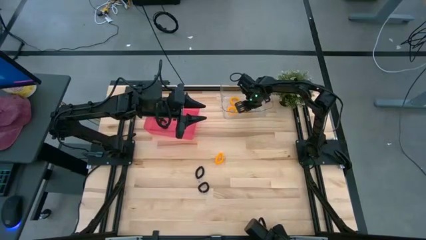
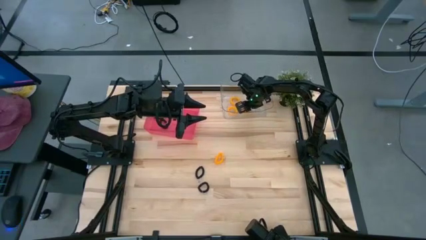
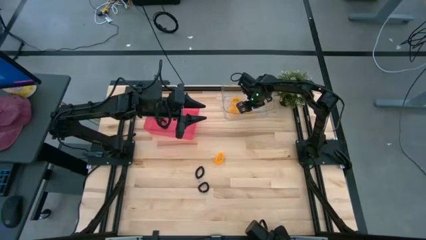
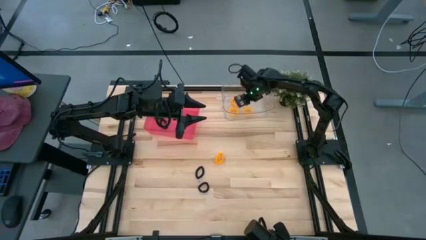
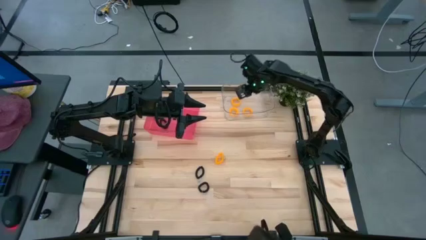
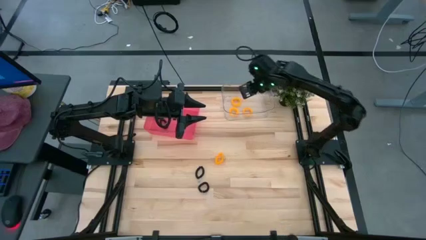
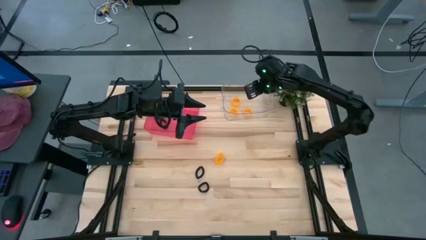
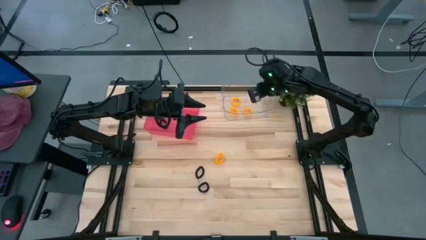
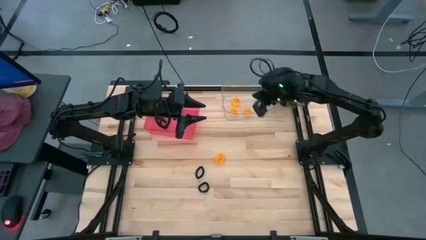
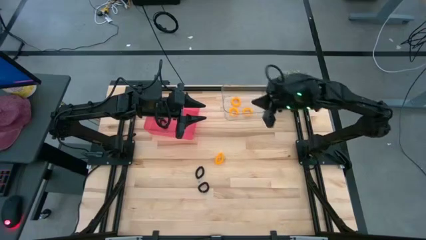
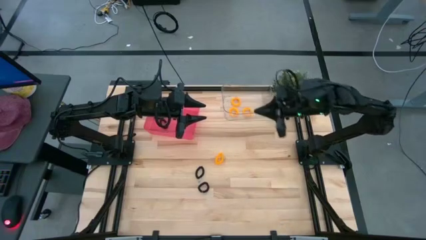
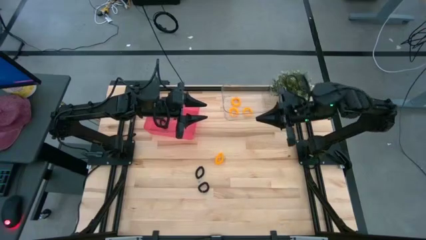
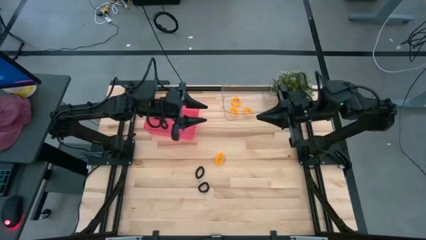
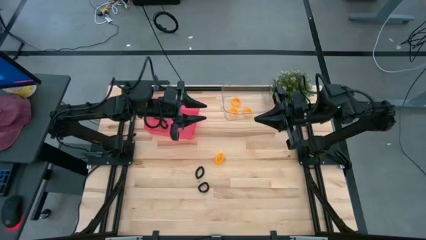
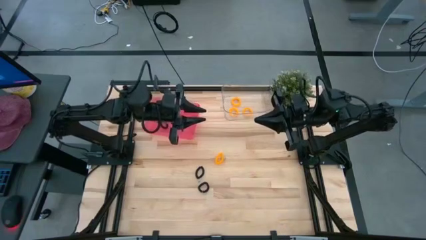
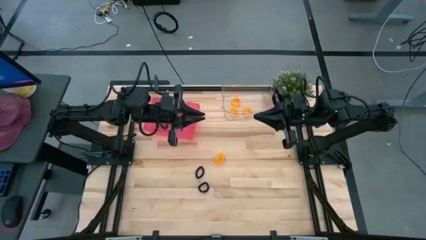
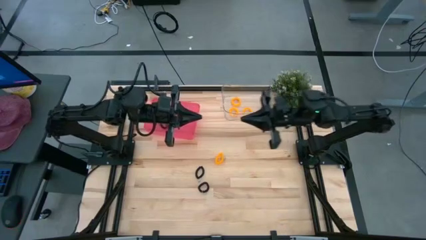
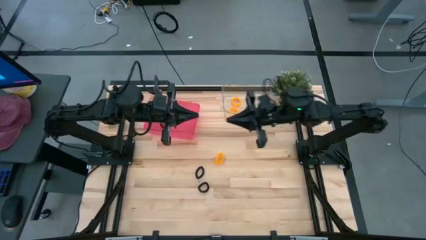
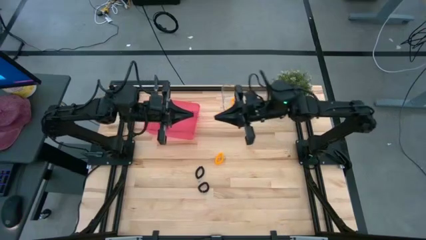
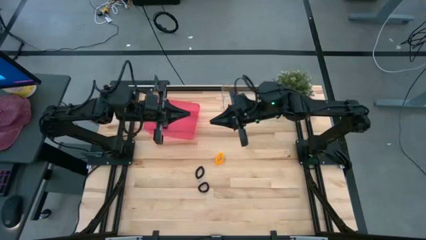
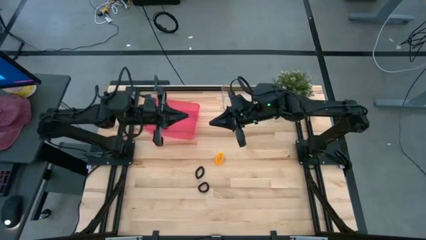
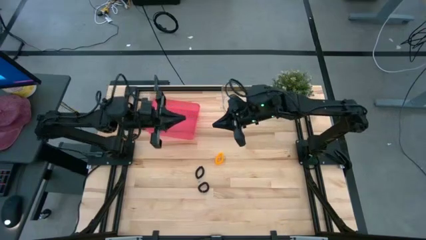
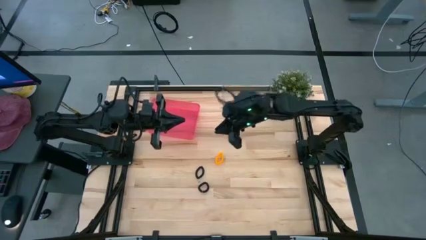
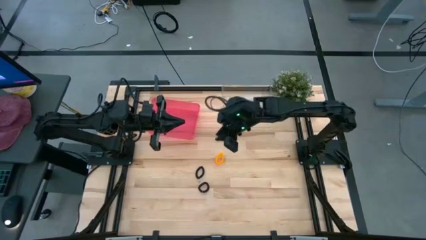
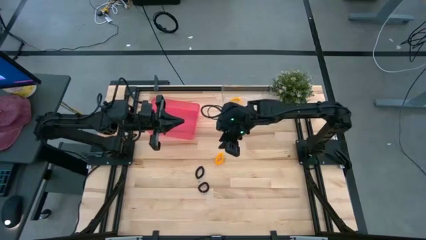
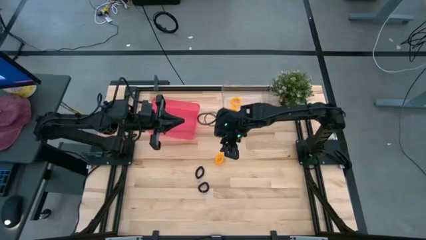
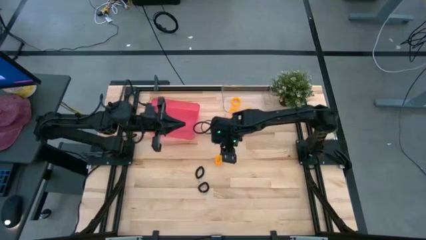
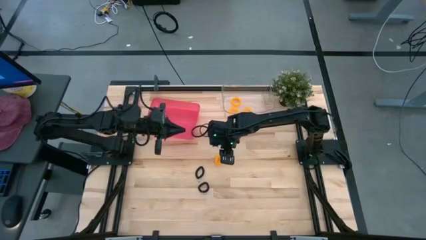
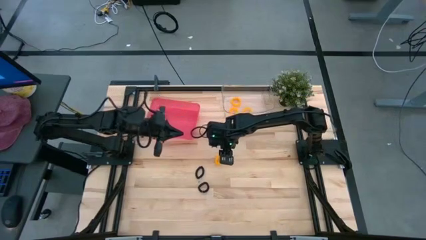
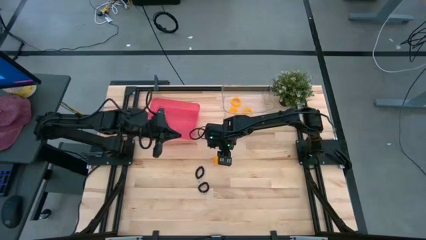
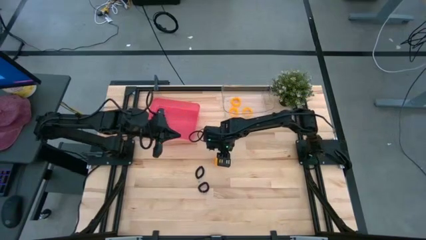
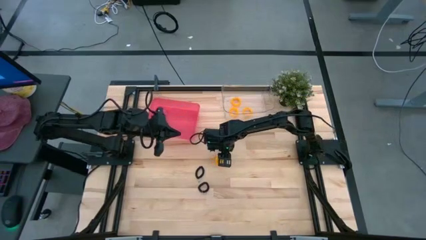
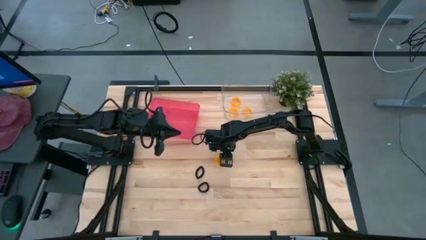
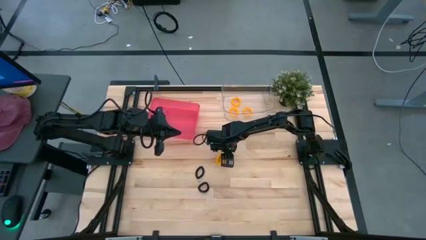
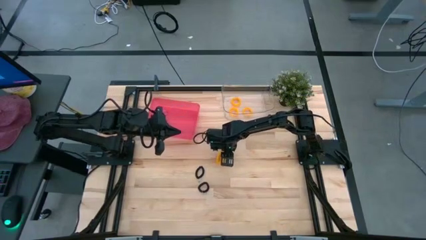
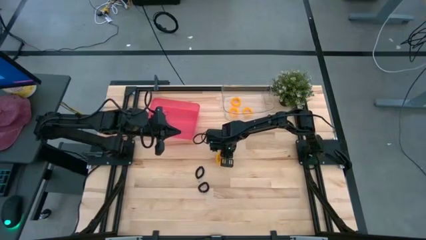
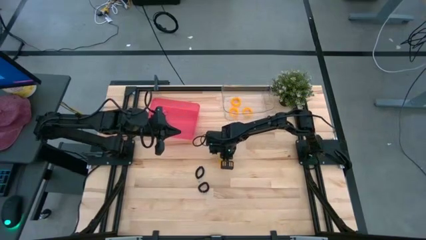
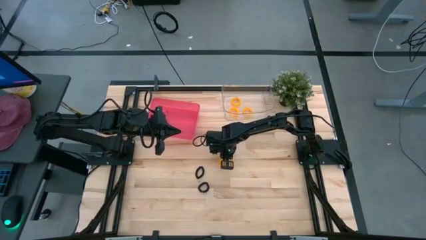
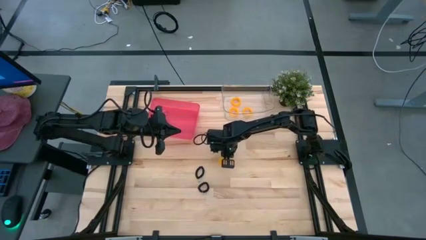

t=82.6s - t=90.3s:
Task: Sort spring keychains
Put the yellow spring keychain into the transparent bin

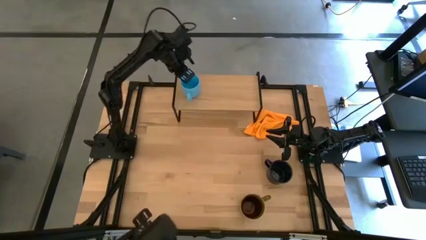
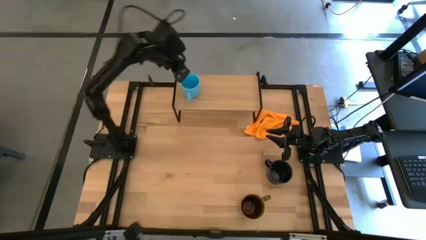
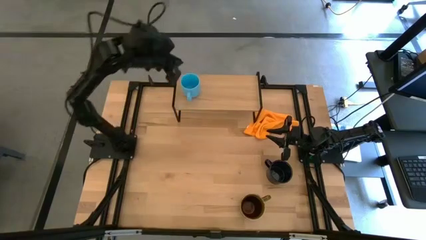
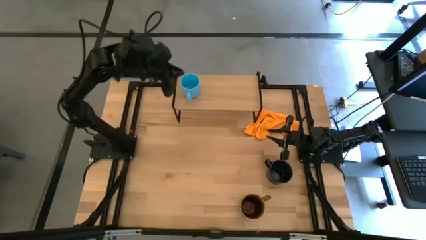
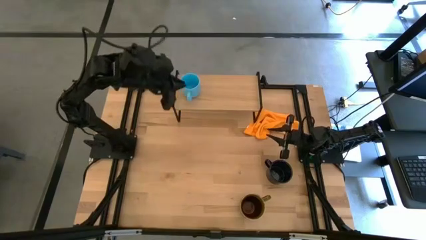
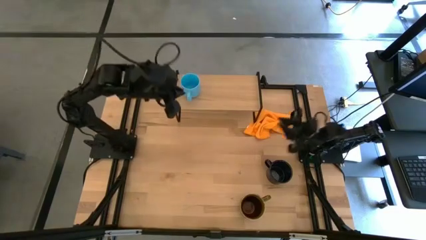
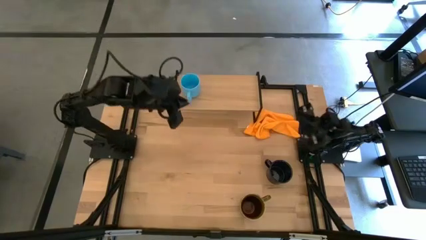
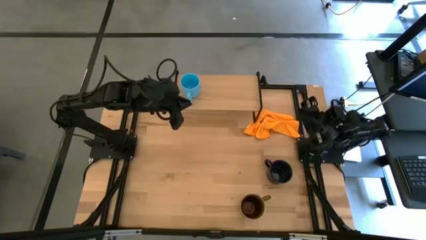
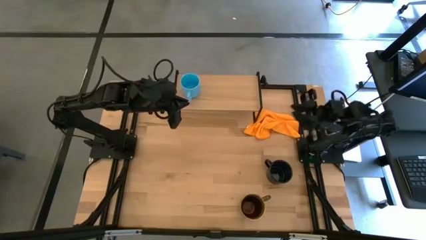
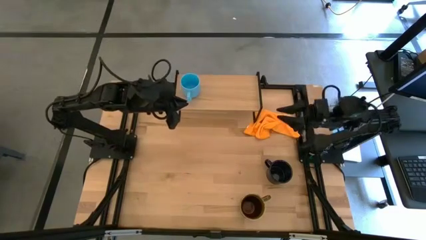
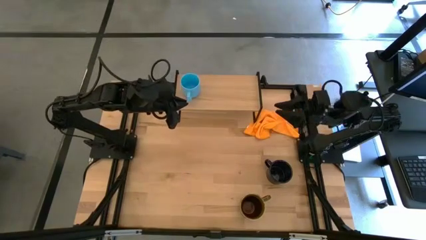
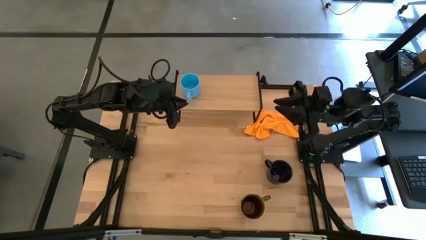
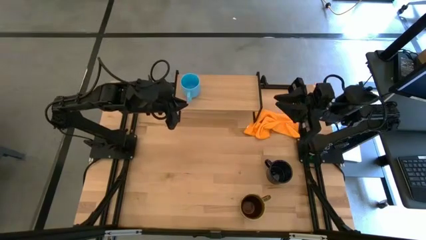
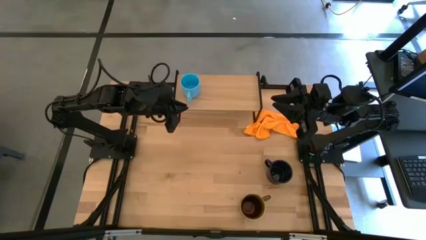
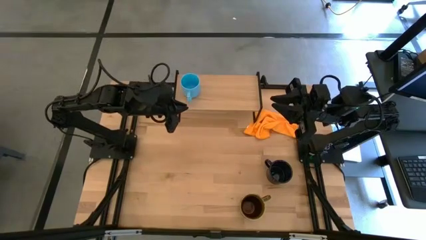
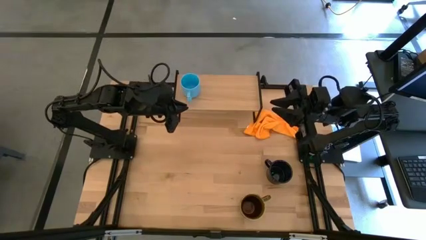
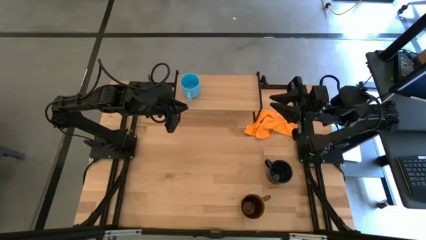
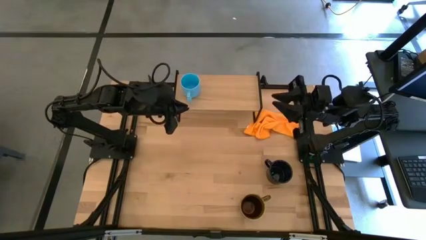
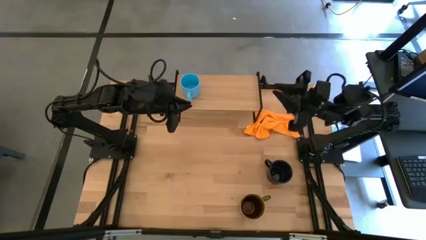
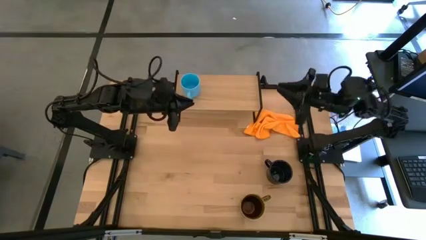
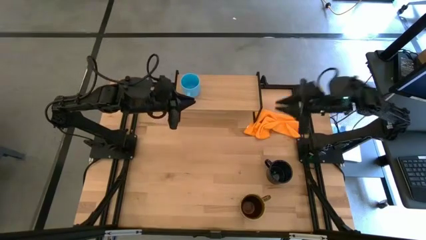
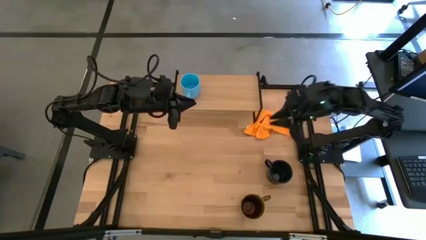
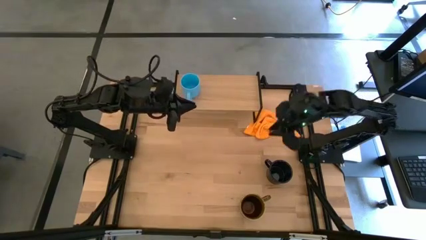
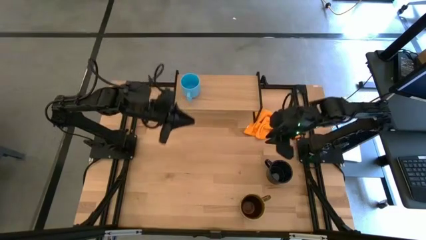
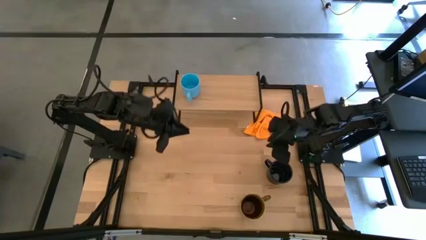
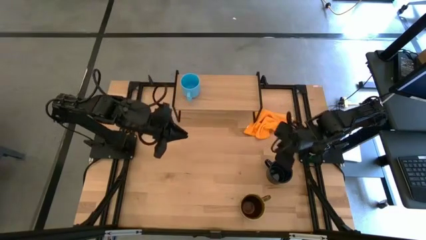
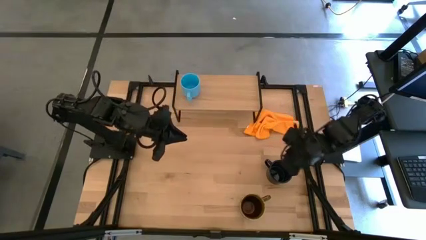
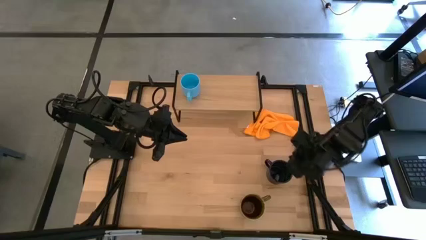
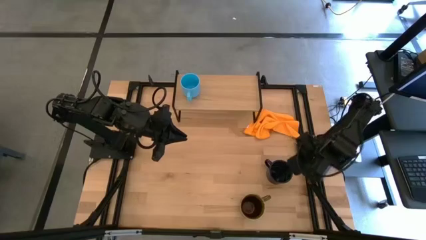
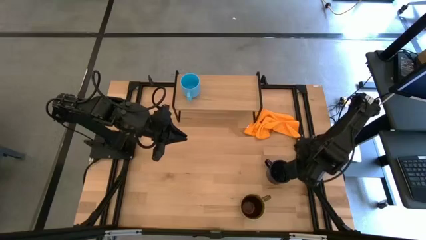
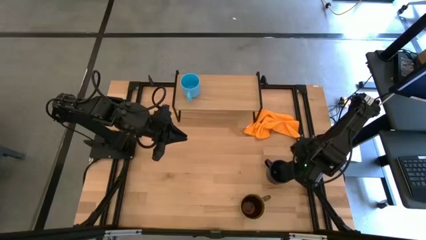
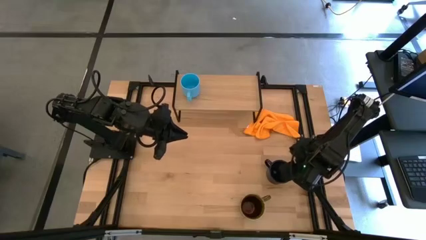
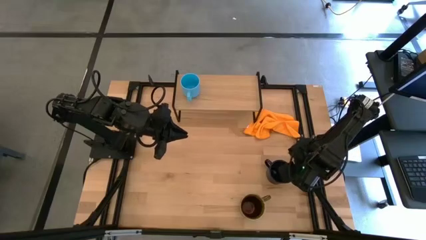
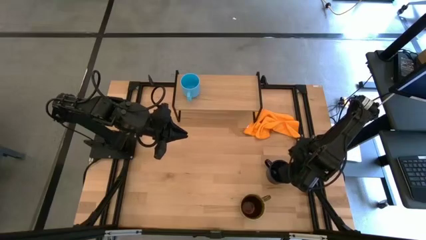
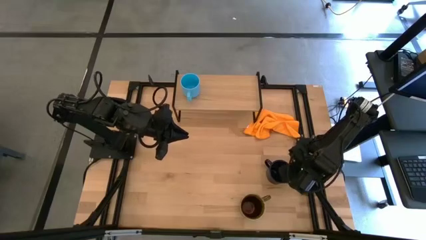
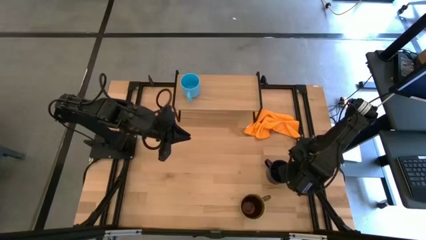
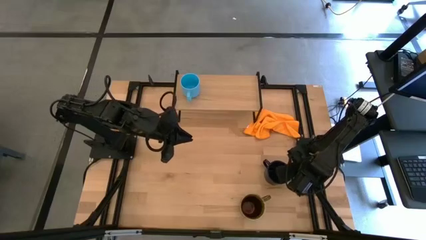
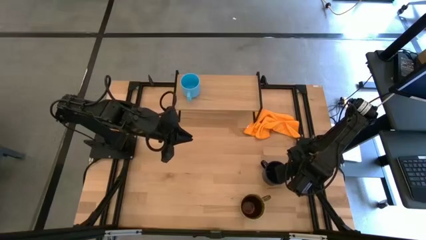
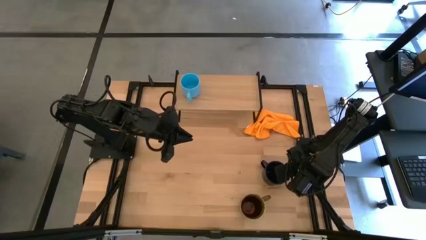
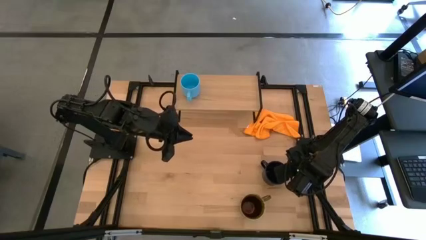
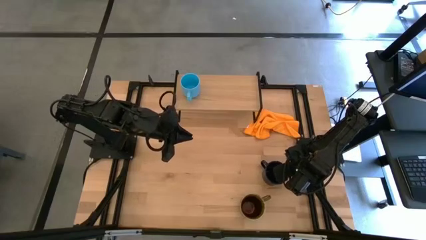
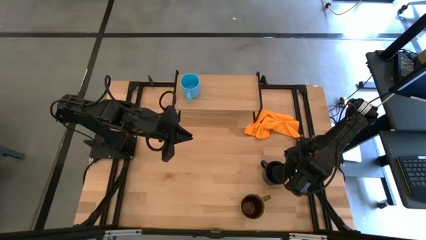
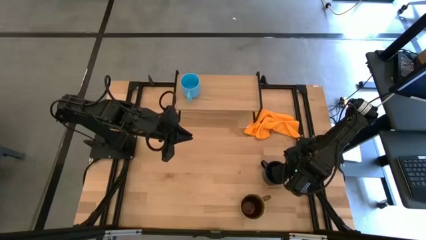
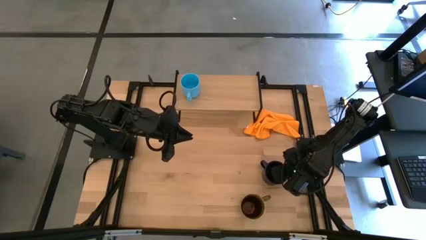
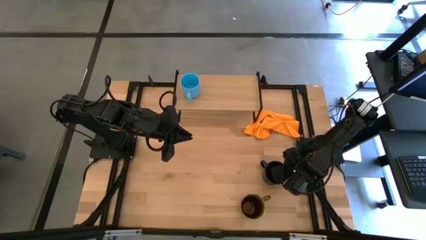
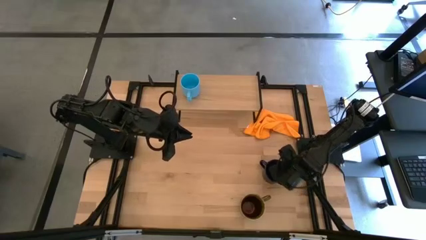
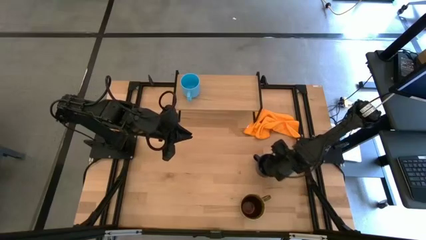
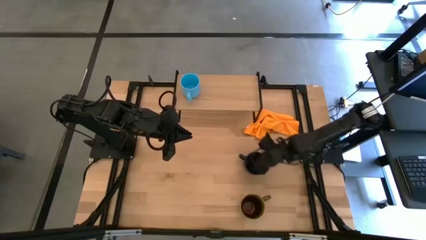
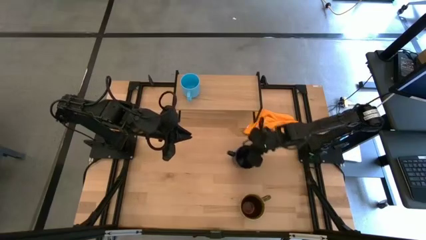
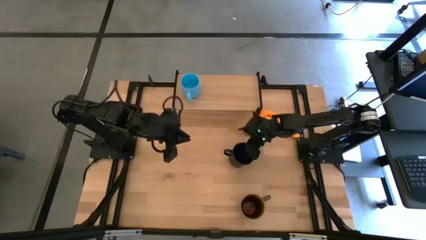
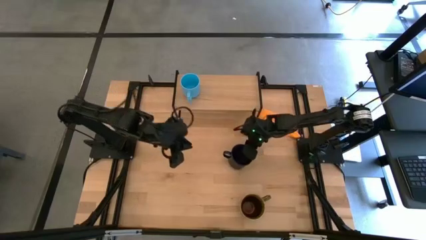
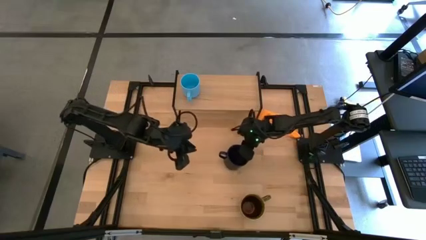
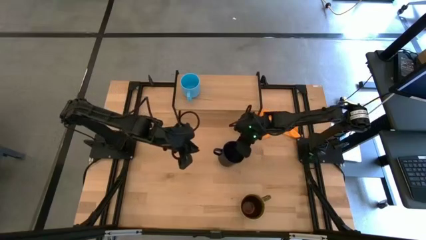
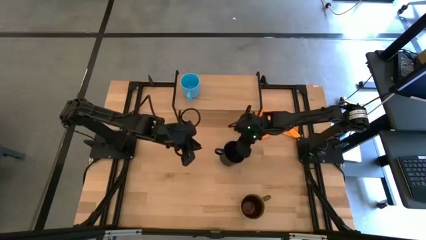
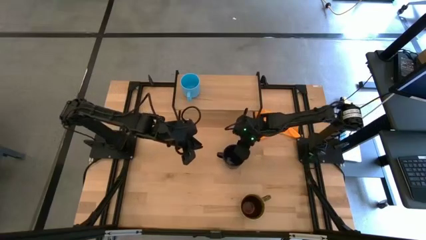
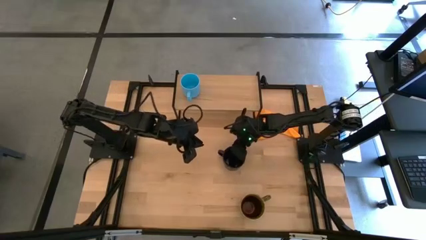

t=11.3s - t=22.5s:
Task: Stack small to large cups/mugs on shelf
Put the black mug on the shelf
